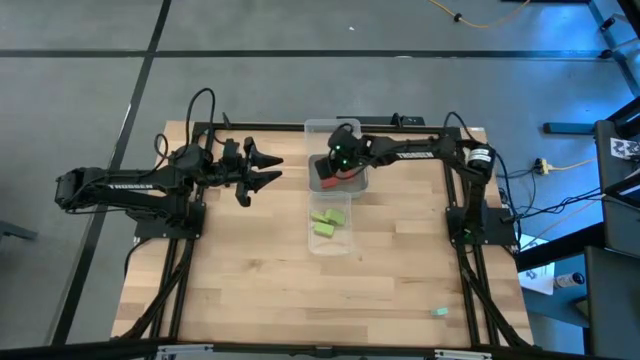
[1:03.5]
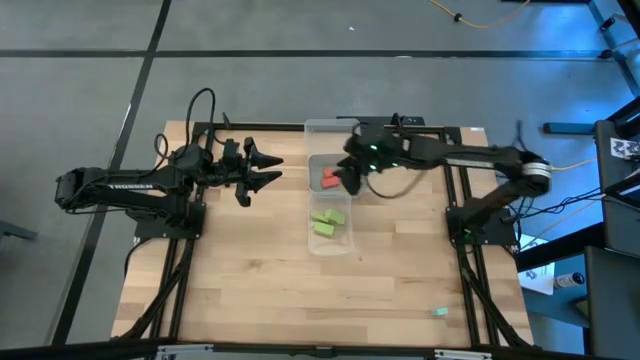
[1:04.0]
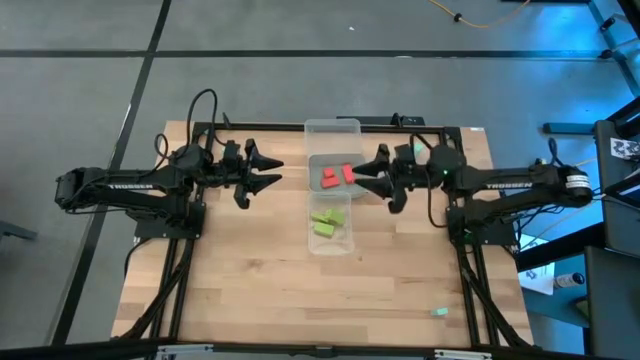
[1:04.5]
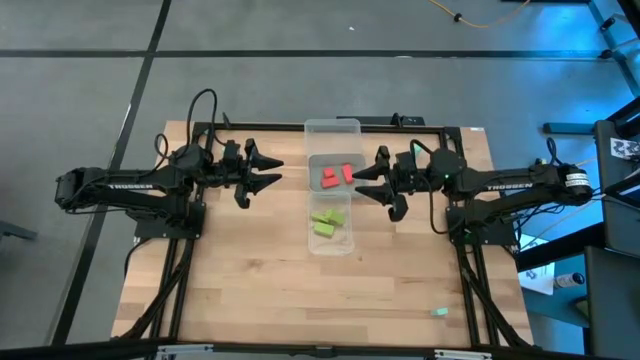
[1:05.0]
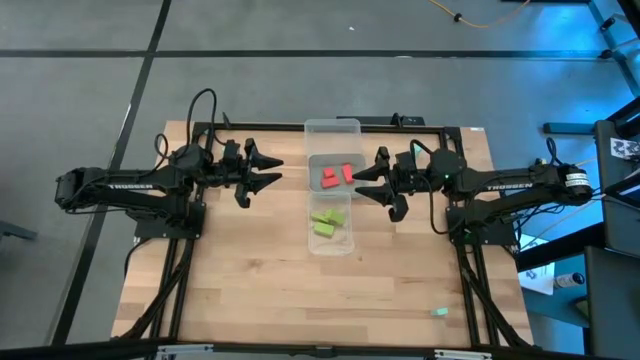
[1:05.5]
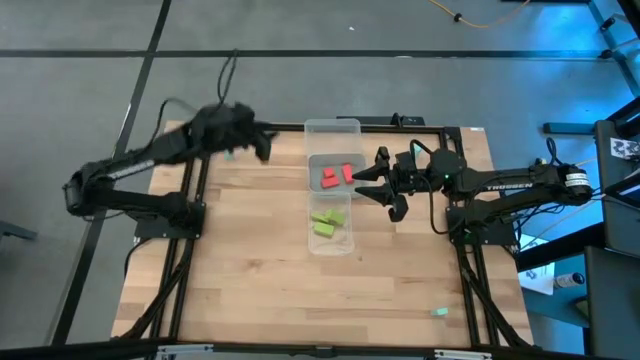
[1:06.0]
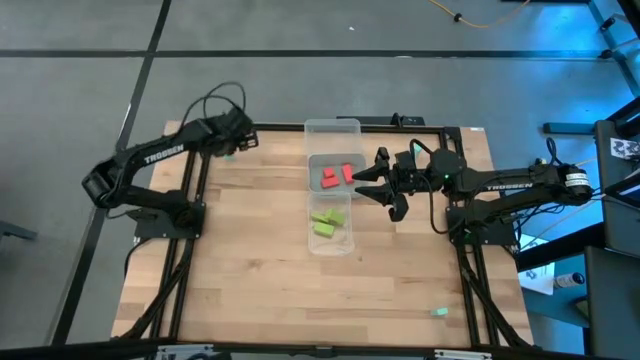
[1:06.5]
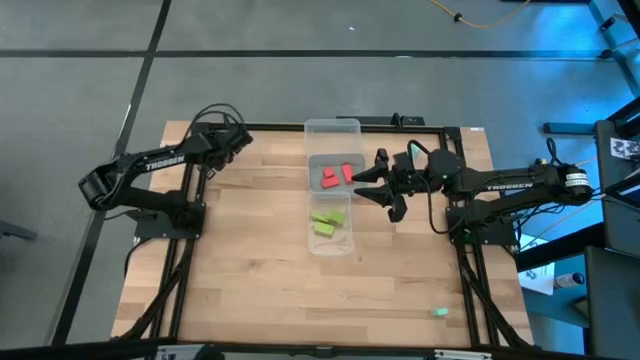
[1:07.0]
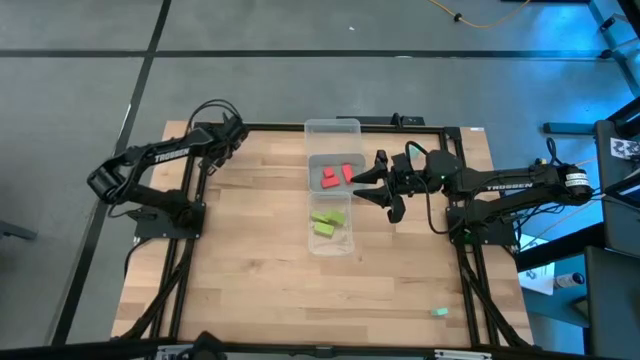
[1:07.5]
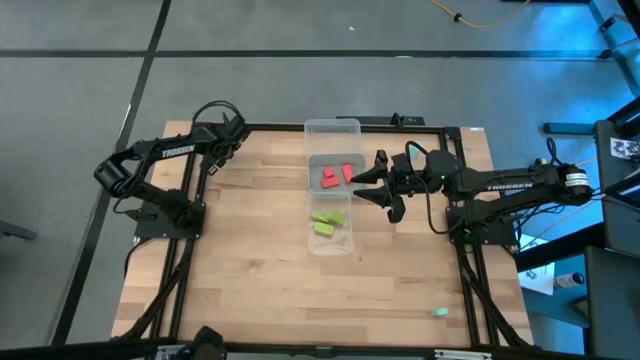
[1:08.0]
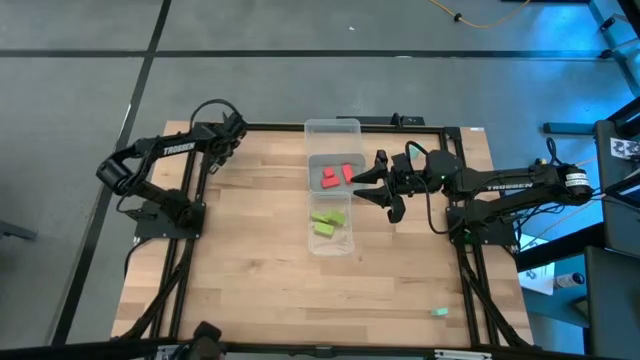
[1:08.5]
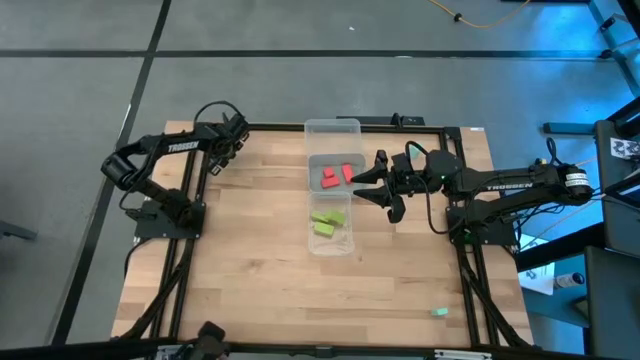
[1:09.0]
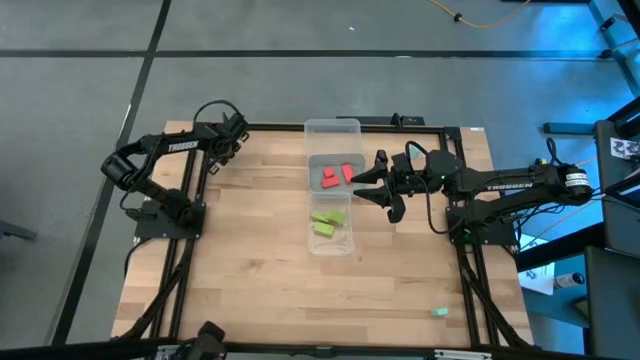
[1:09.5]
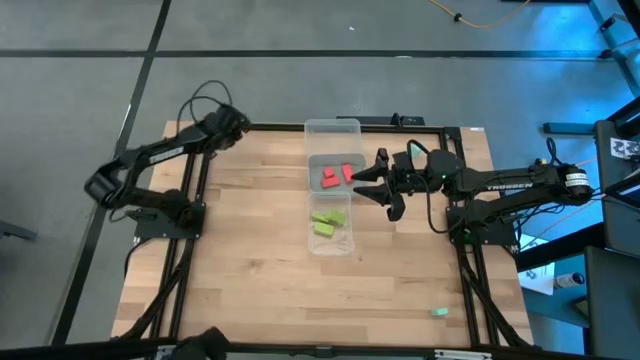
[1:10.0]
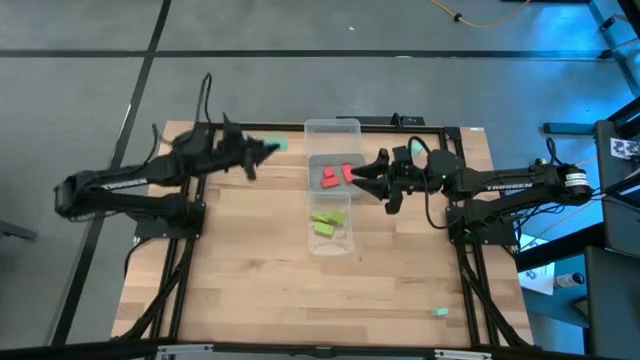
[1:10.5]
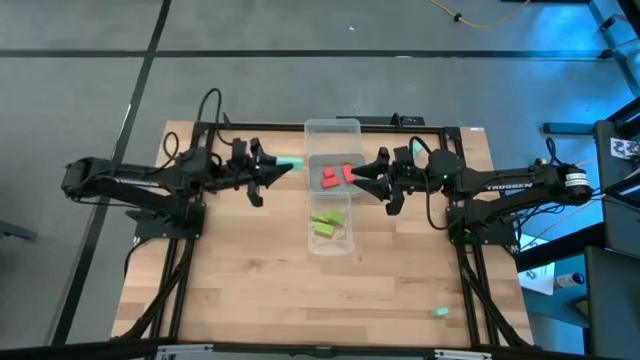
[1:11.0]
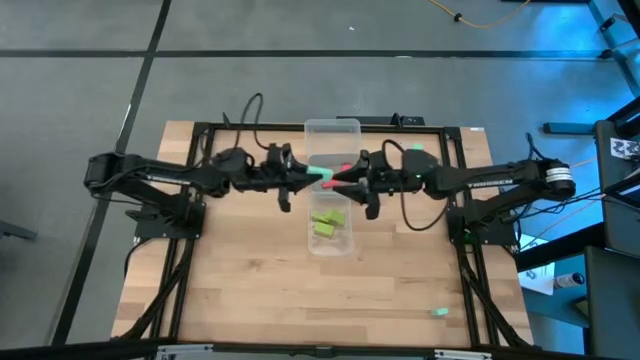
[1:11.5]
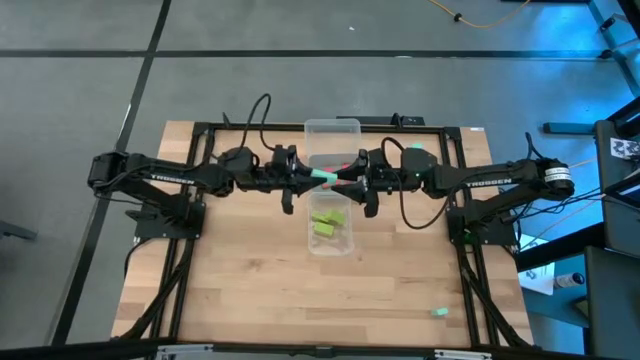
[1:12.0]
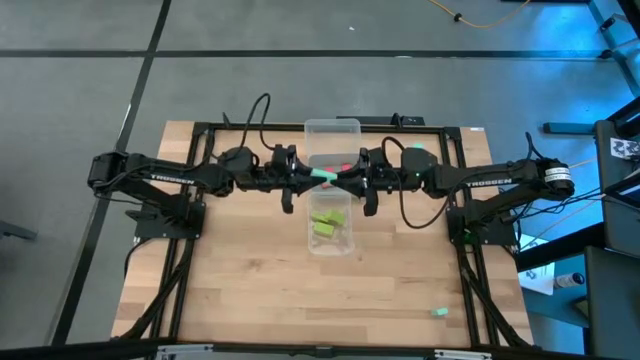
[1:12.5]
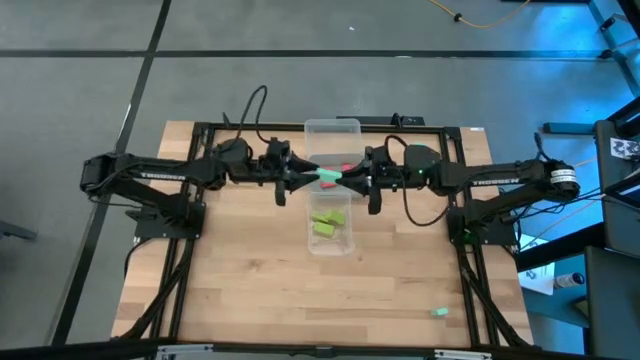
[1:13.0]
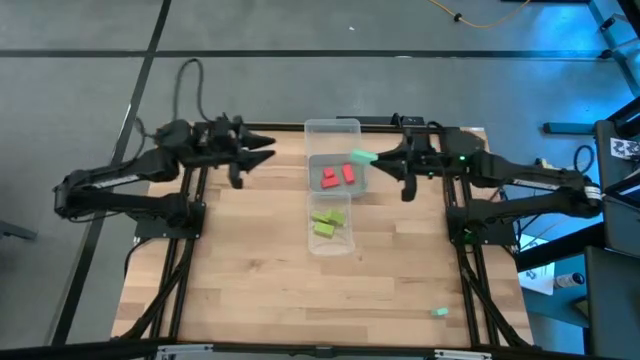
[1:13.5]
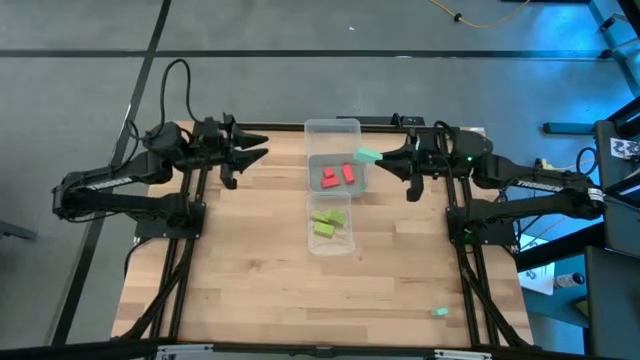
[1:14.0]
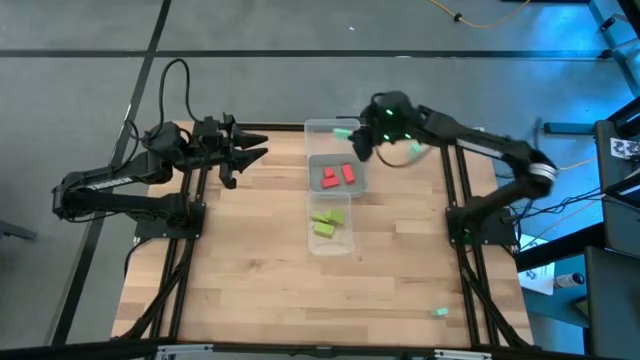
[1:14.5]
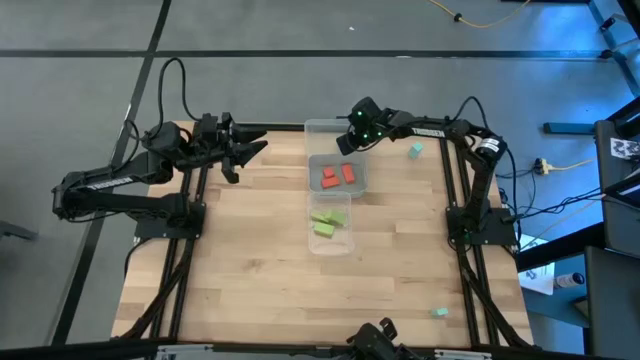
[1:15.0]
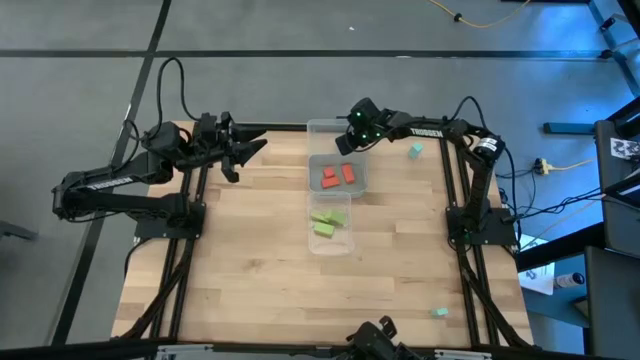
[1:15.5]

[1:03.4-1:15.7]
Task: Sort & place blocks by color
Put the top left blue block into the top transparent bin

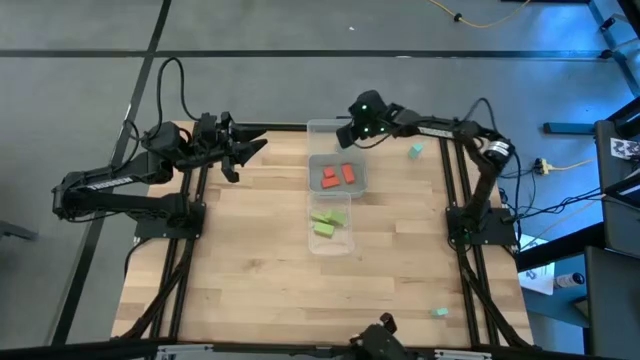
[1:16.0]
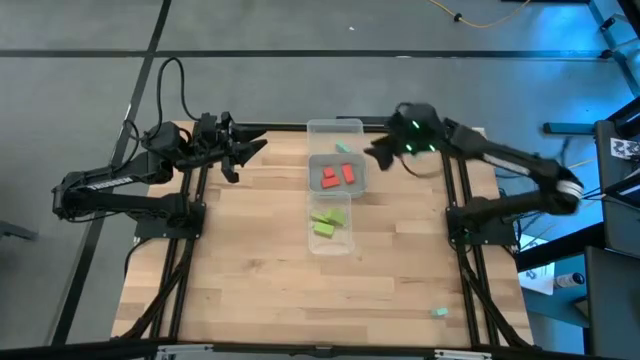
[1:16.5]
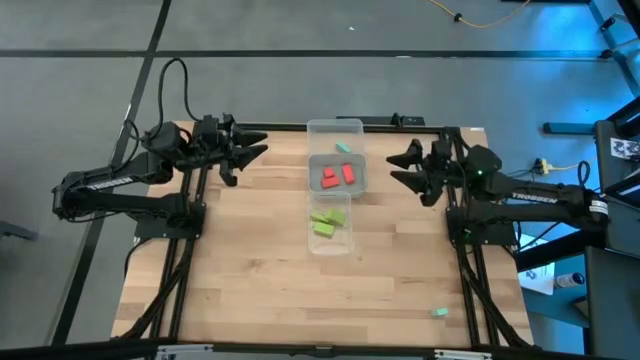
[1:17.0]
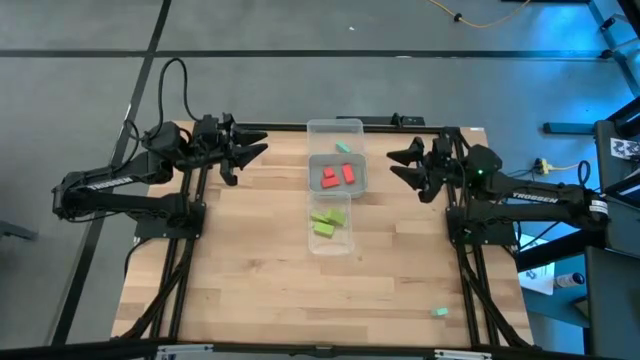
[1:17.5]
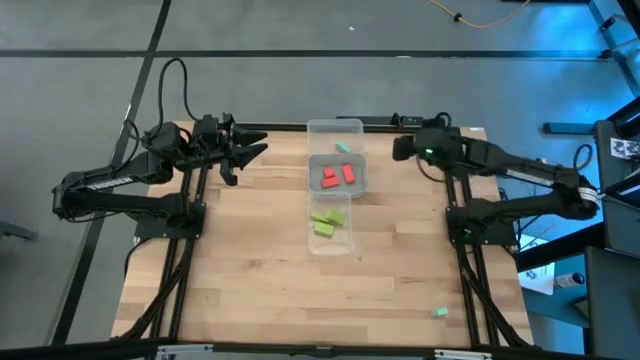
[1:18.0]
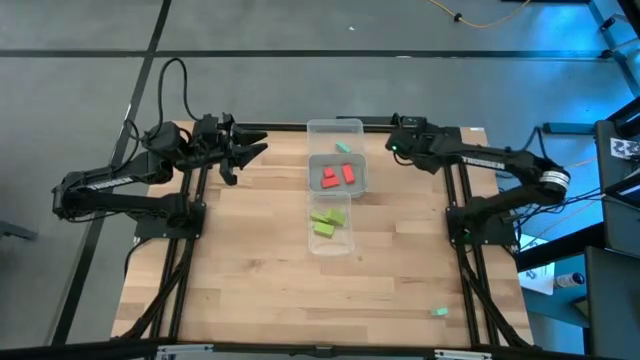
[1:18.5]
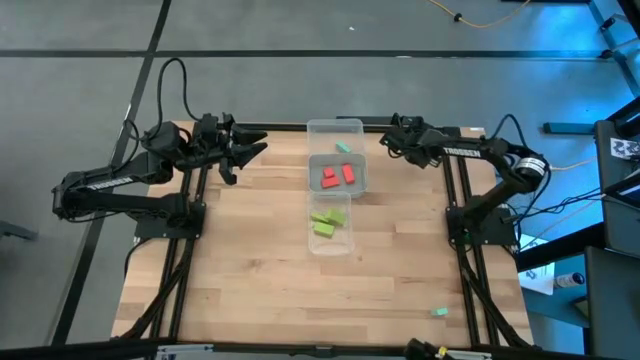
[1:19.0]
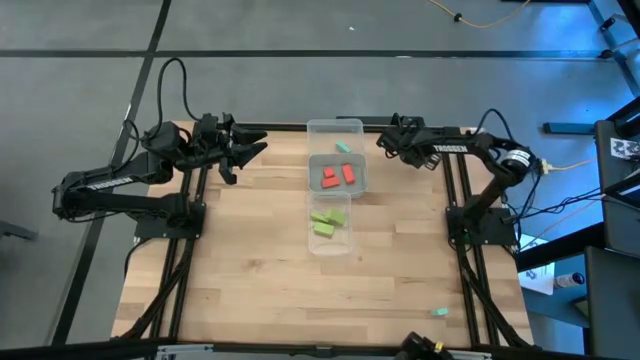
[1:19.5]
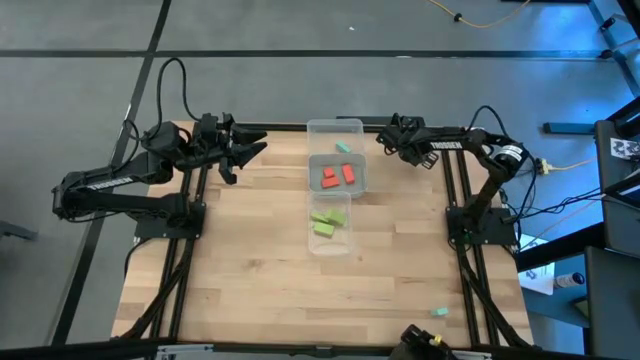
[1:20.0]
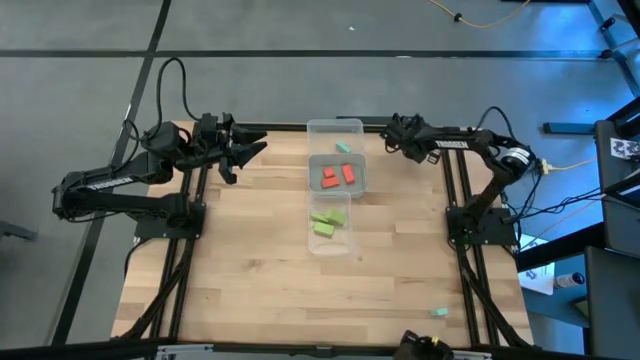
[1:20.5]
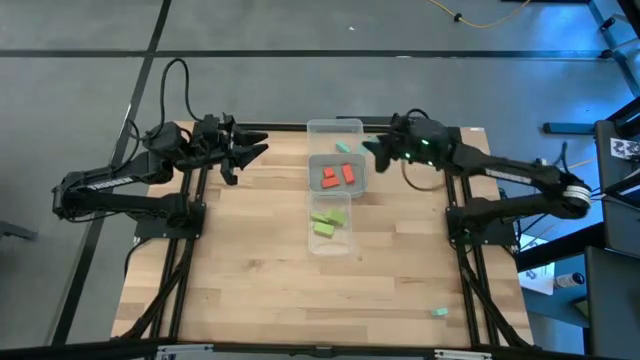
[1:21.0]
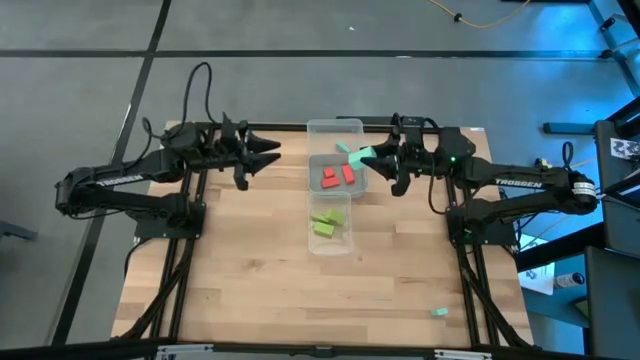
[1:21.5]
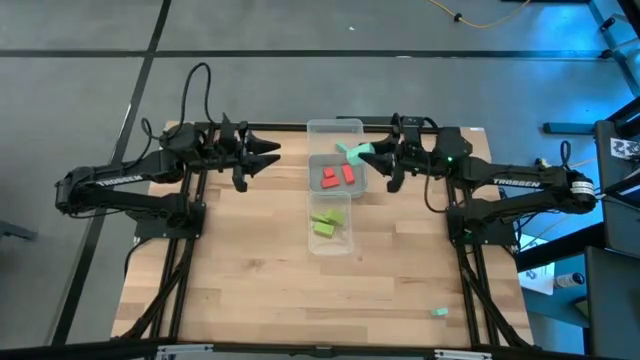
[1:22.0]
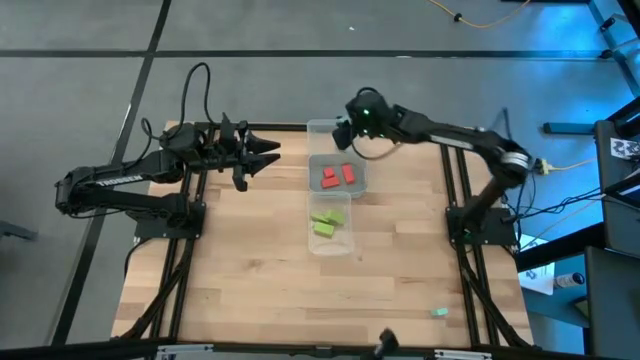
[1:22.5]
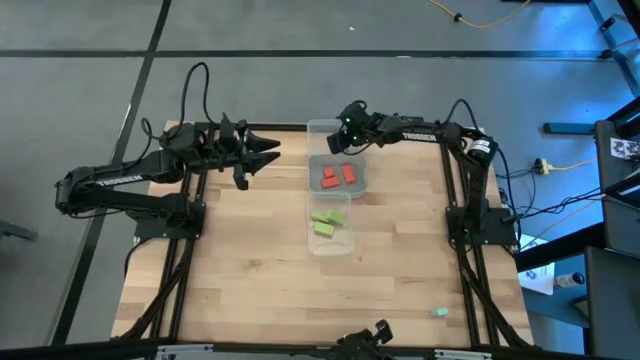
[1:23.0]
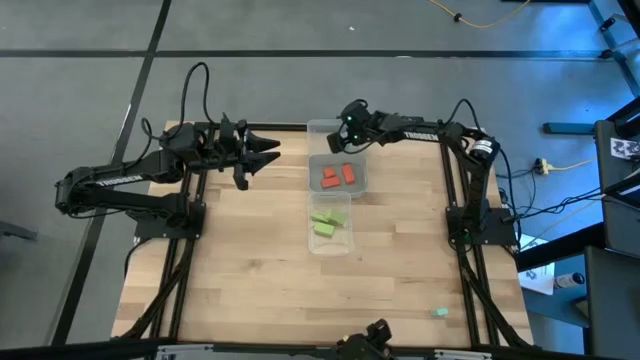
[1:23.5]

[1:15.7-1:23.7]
Put the top blue block into the top transparent bin
